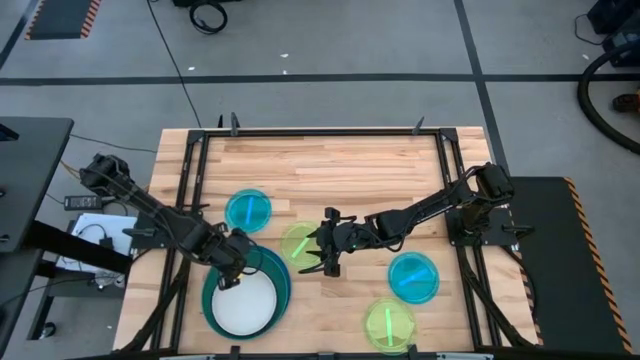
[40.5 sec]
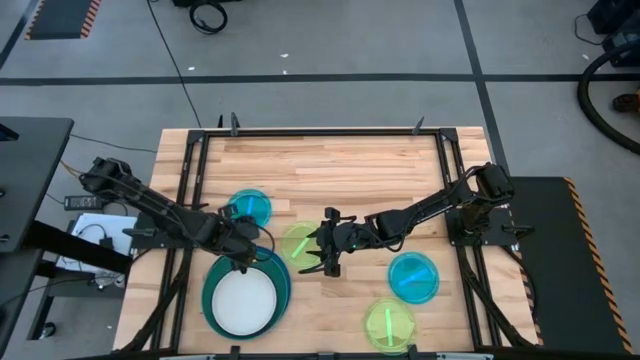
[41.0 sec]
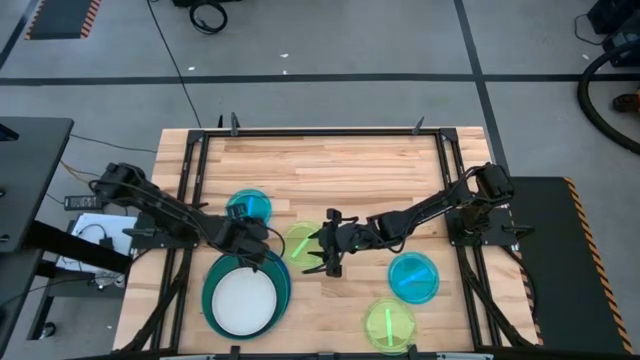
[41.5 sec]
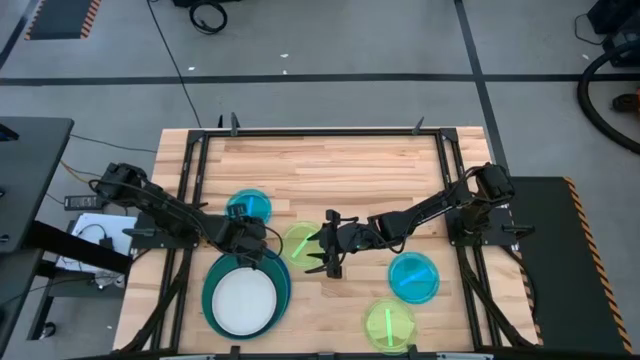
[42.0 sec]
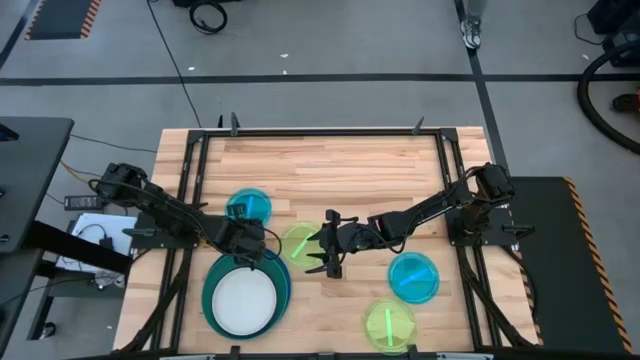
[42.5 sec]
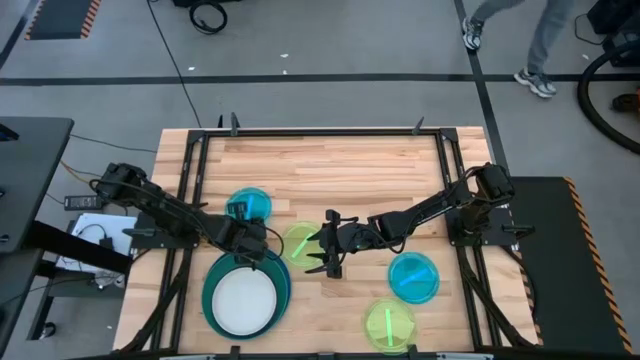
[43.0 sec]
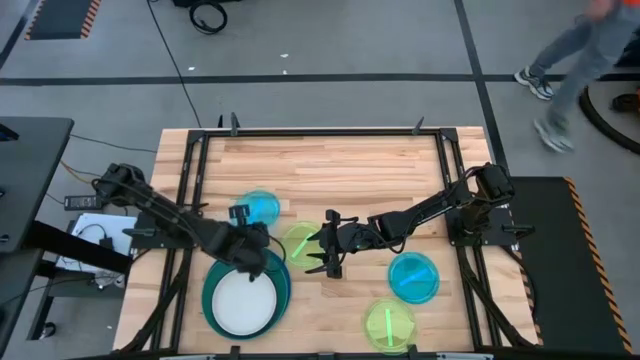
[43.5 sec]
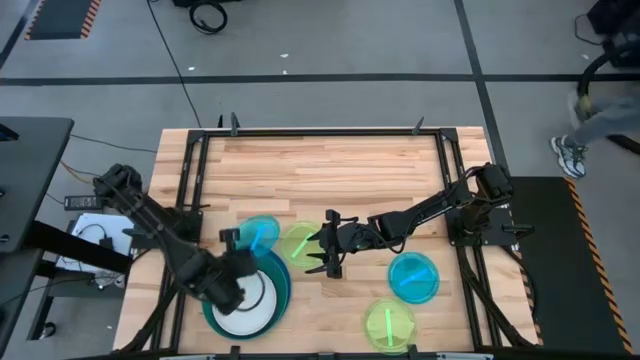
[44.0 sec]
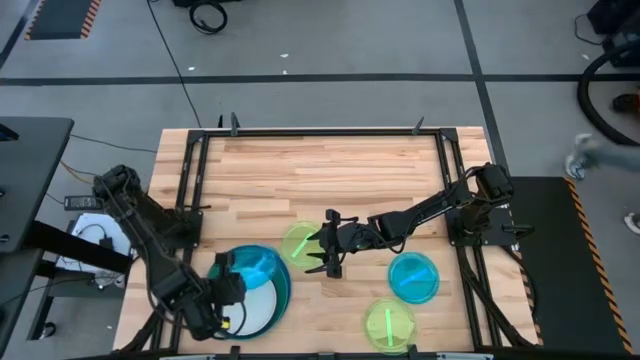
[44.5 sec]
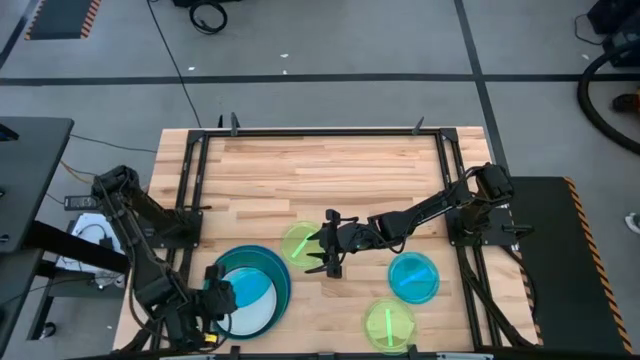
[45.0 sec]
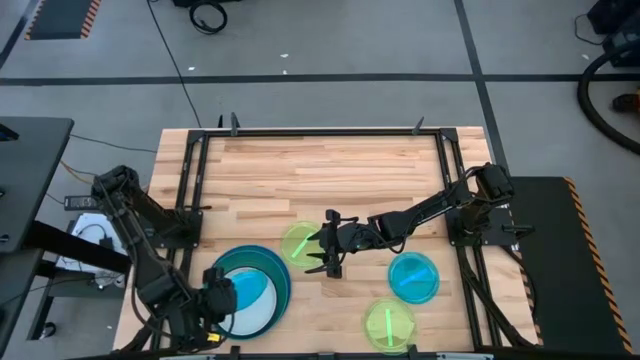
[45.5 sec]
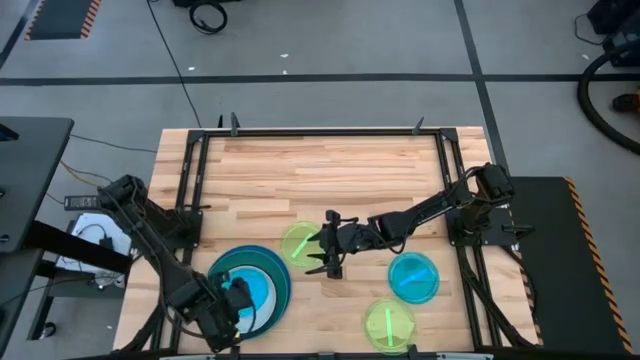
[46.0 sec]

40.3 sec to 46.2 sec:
Task: Stack plastic plates
Stack the left transparent blue plate on the white plate

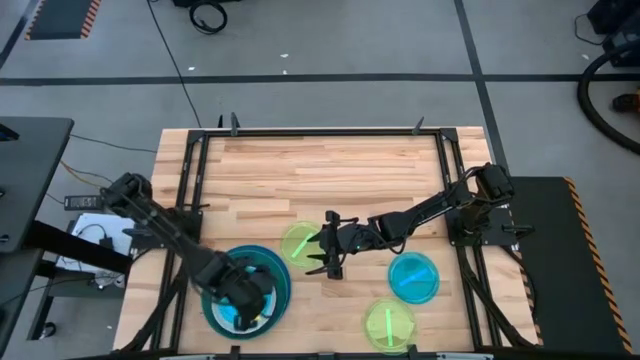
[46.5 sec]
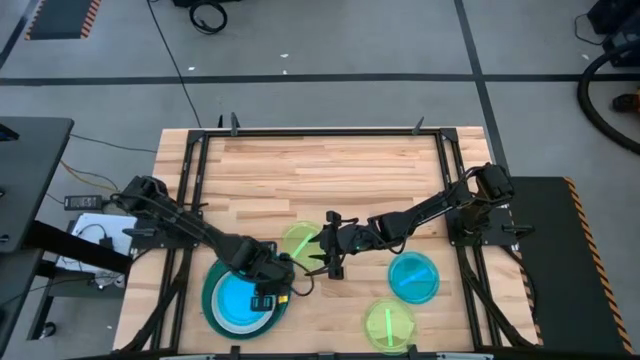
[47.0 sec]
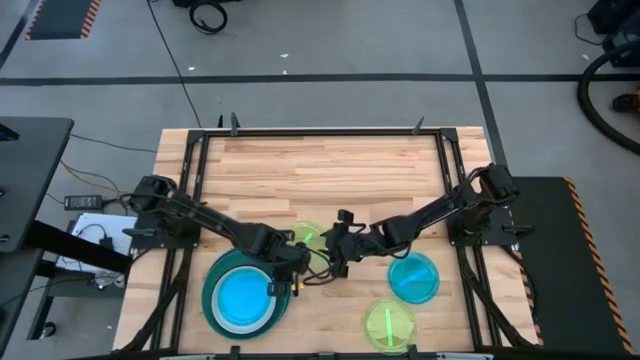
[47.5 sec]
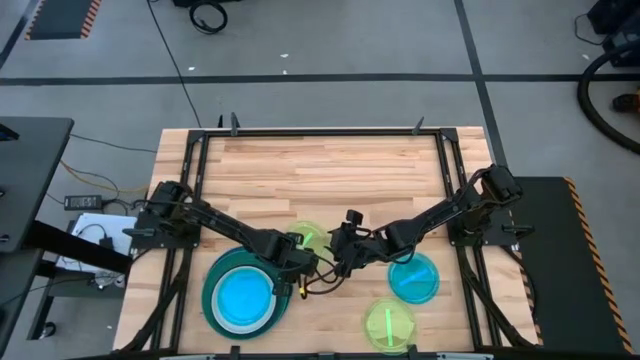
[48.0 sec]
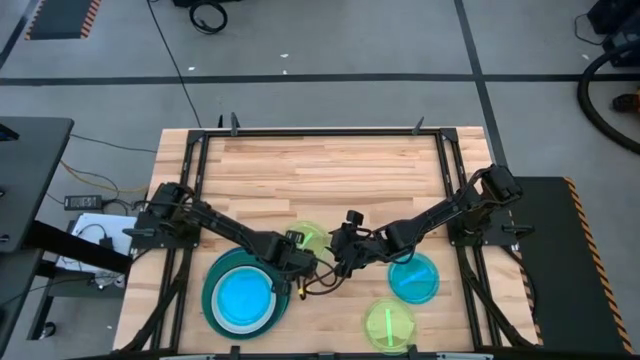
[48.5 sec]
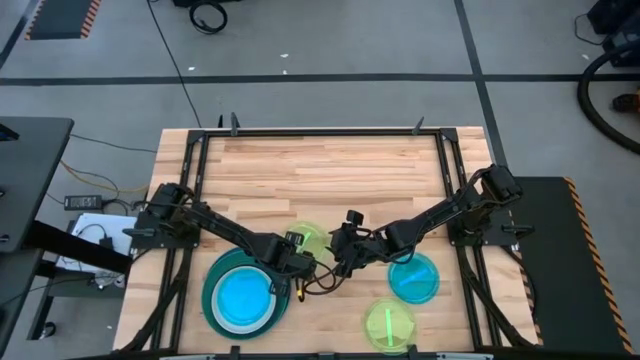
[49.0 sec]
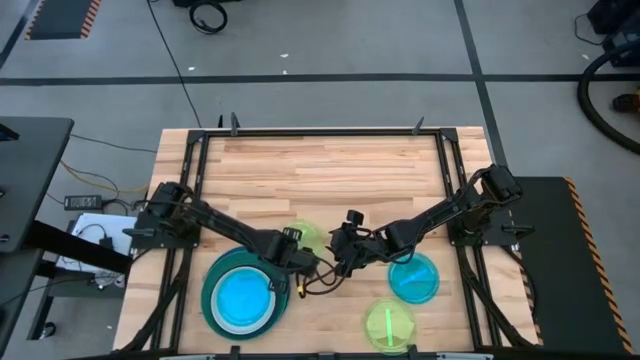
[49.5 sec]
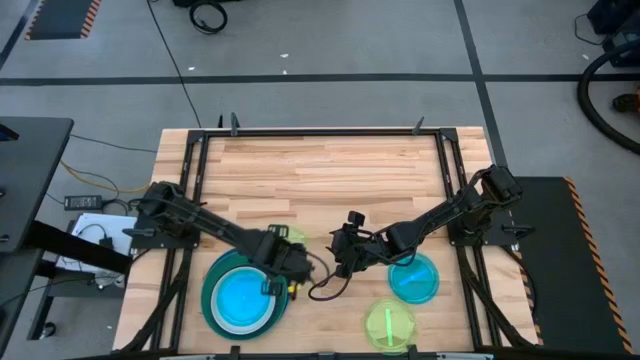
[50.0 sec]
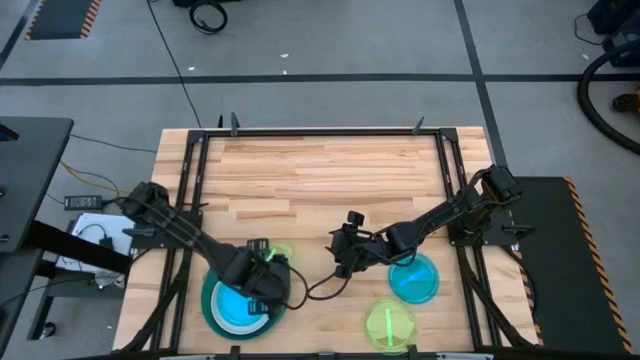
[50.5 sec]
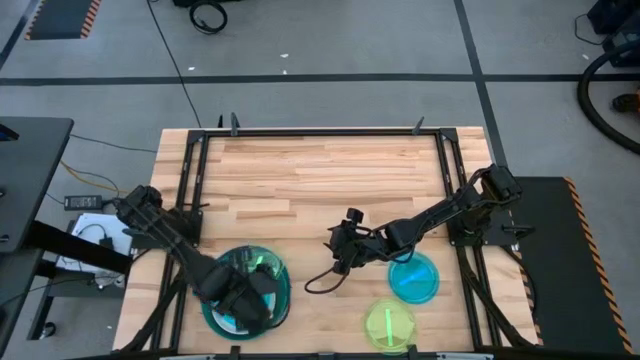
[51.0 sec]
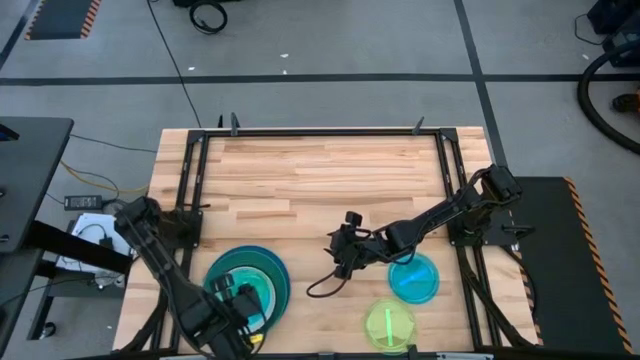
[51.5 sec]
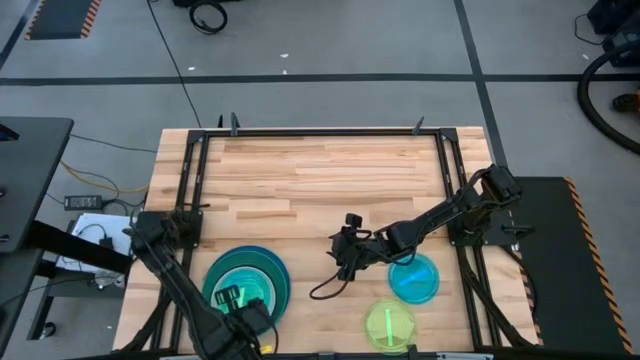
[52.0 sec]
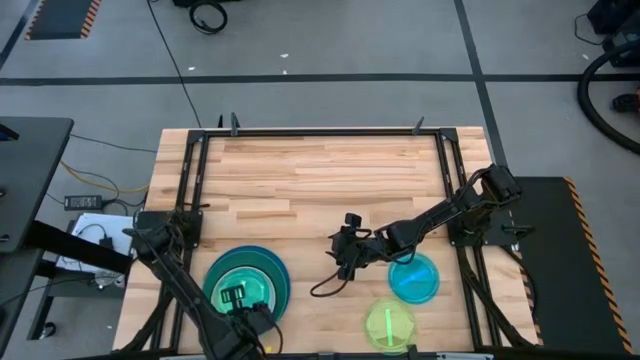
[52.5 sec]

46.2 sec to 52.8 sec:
Stack the transparent green plate on the transparent blue

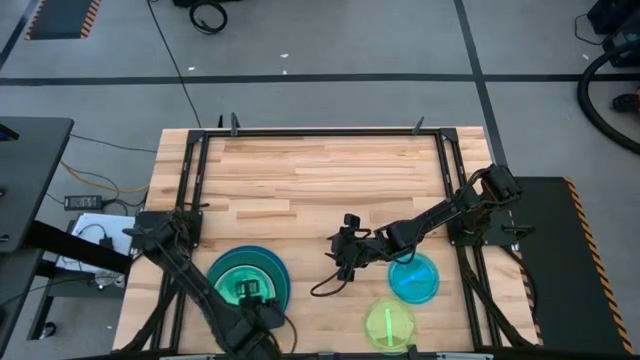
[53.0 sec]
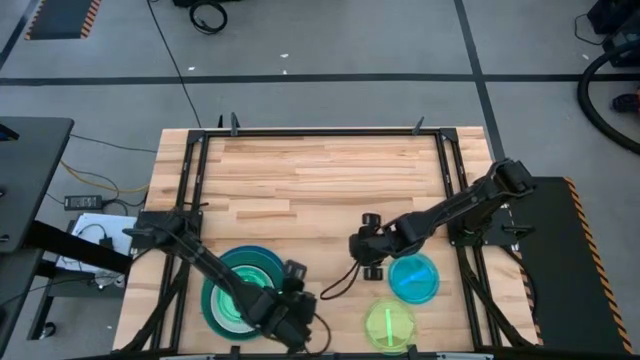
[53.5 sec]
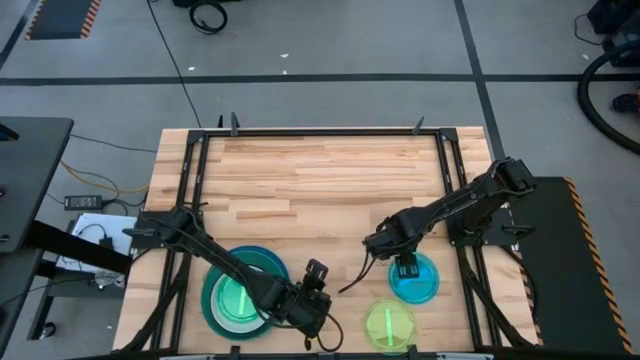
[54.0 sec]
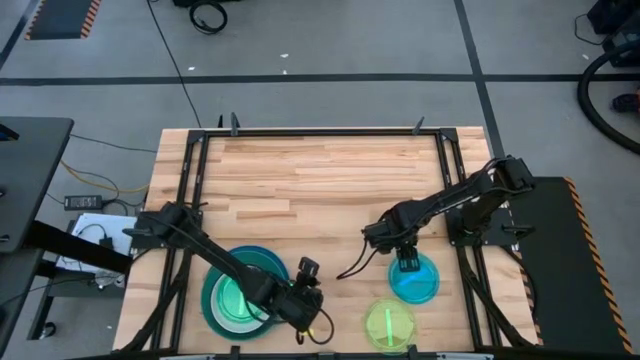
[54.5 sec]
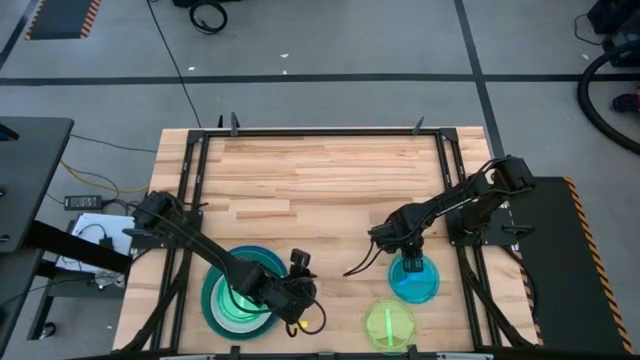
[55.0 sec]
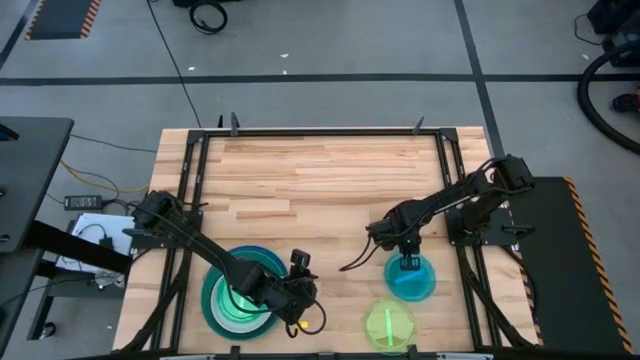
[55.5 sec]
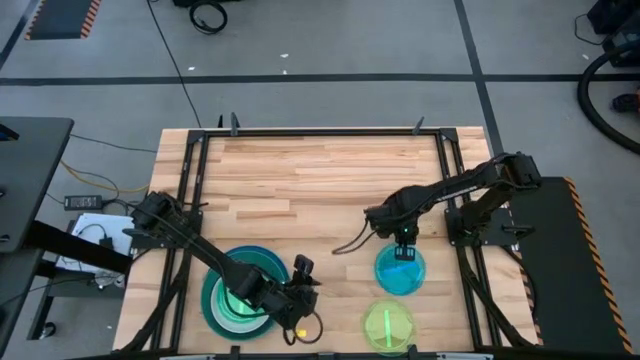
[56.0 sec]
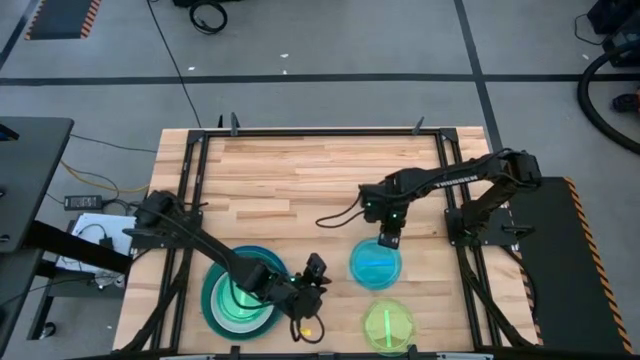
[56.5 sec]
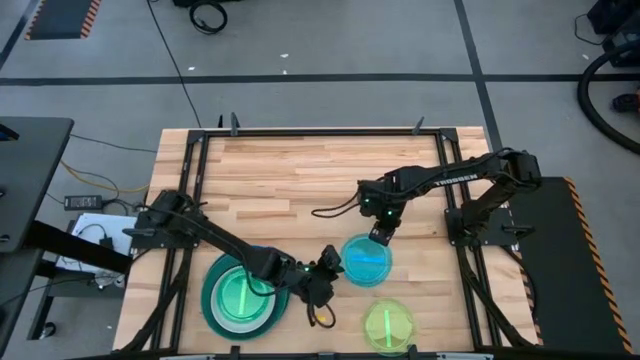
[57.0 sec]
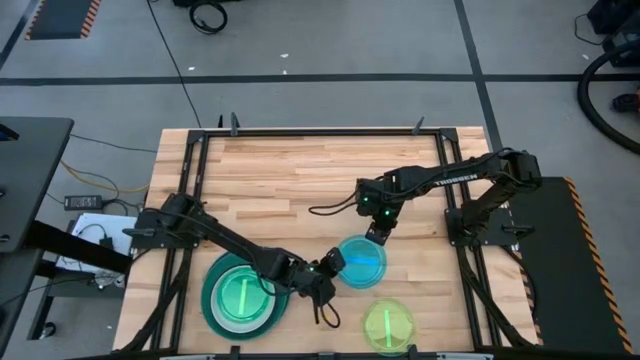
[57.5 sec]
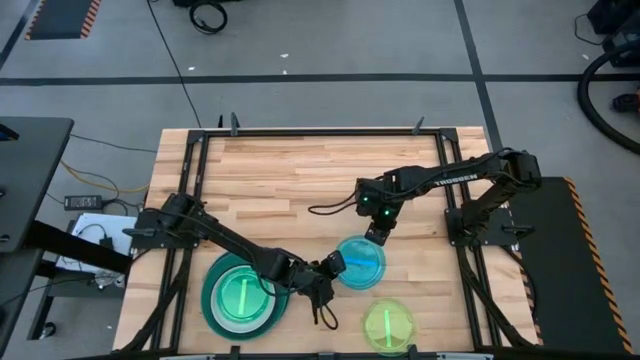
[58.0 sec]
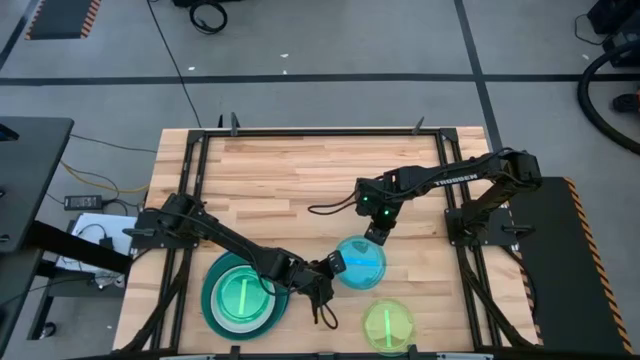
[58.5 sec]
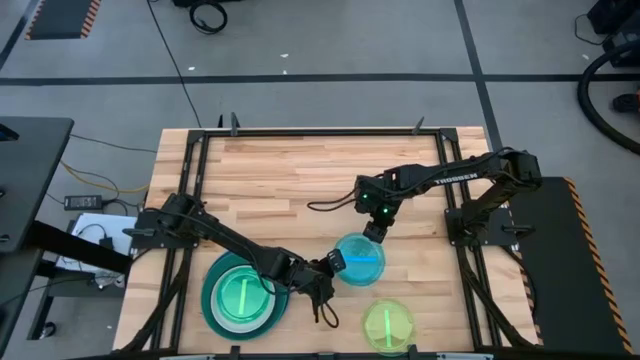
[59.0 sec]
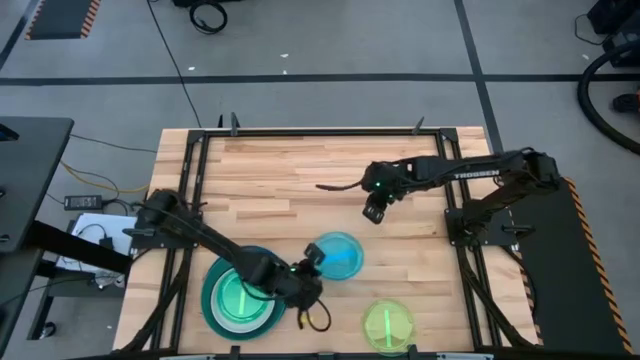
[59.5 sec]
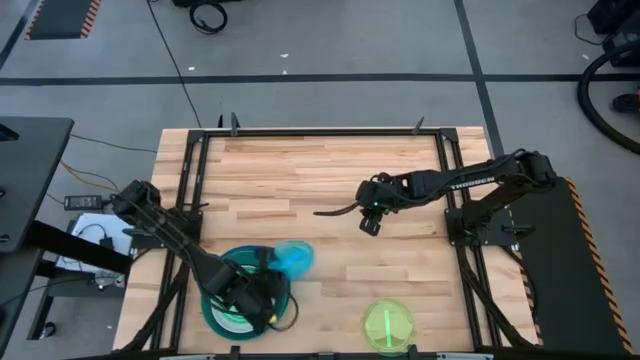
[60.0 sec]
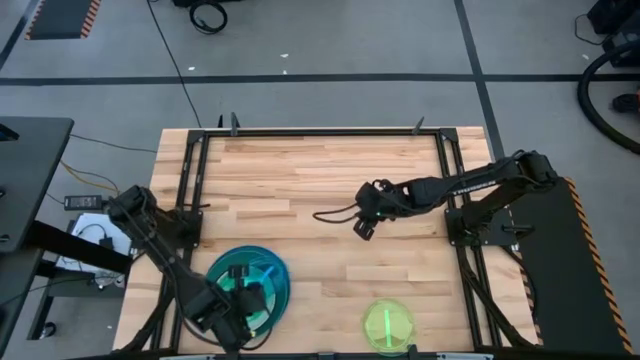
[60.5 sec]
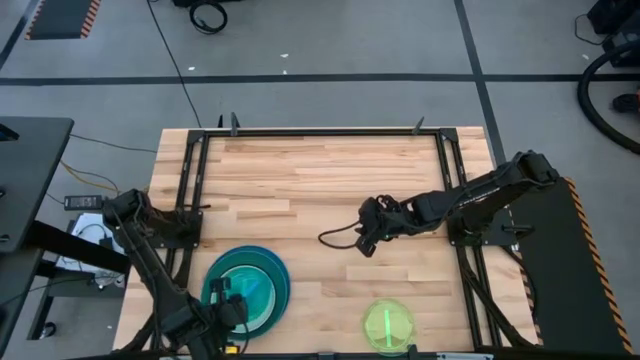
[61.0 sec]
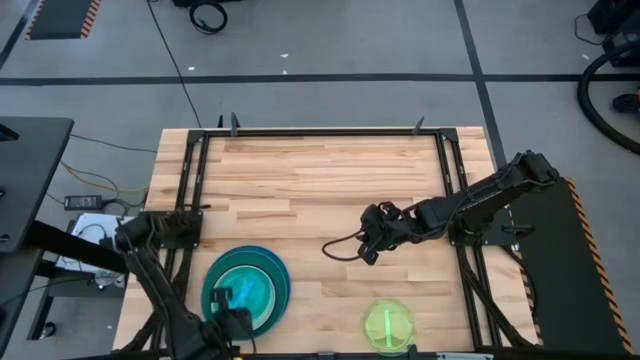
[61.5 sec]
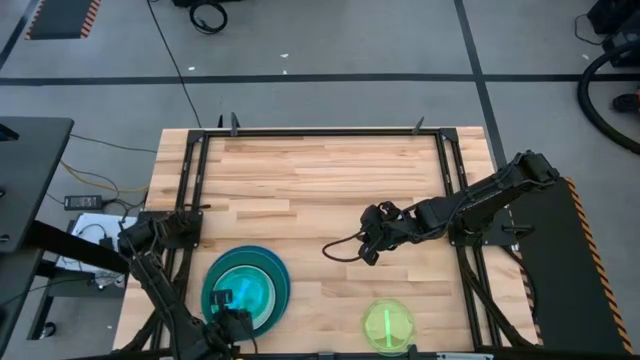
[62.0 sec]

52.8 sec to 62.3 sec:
Stack the transparent blue plate on the transparent green plate
